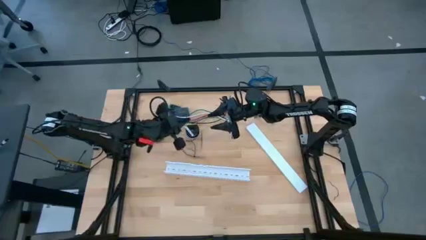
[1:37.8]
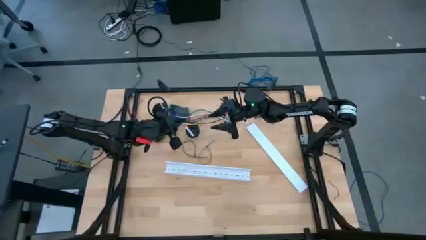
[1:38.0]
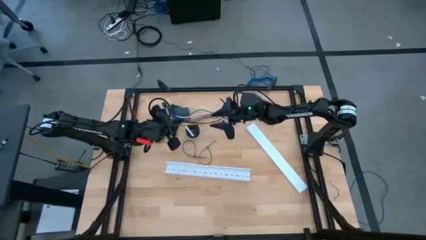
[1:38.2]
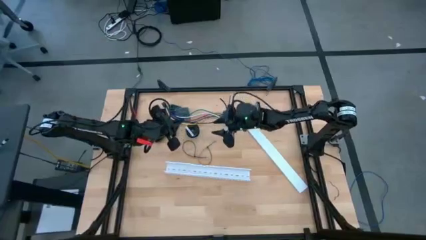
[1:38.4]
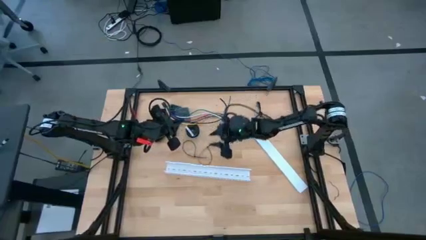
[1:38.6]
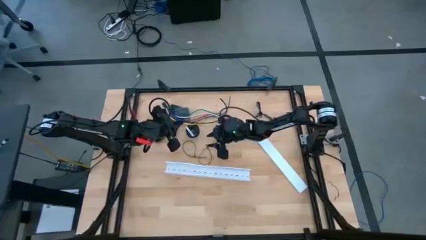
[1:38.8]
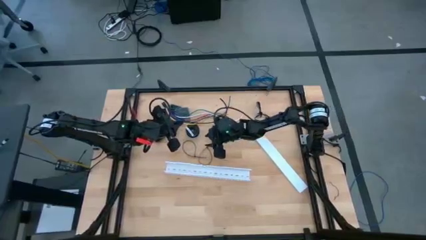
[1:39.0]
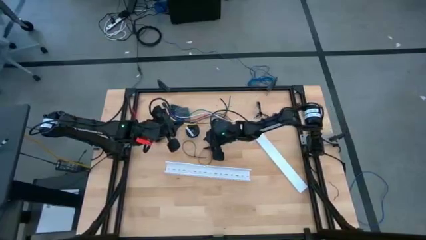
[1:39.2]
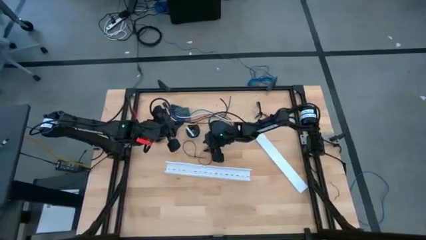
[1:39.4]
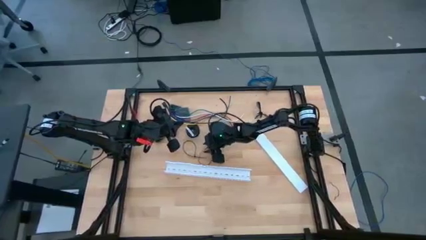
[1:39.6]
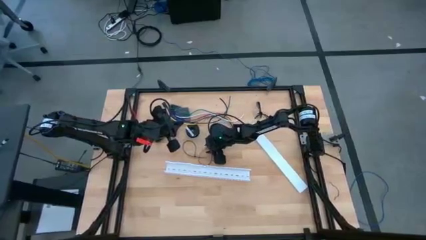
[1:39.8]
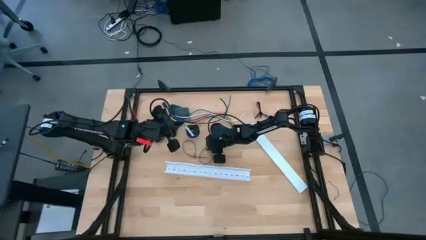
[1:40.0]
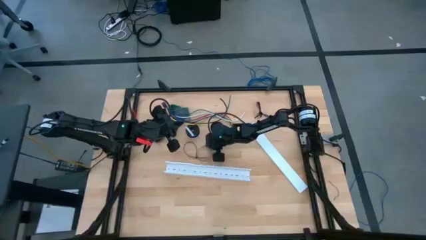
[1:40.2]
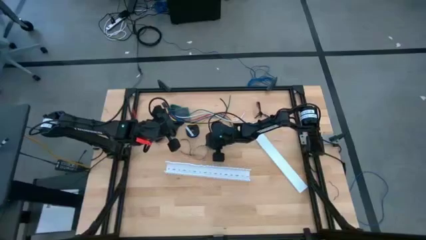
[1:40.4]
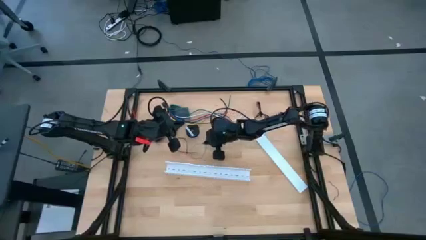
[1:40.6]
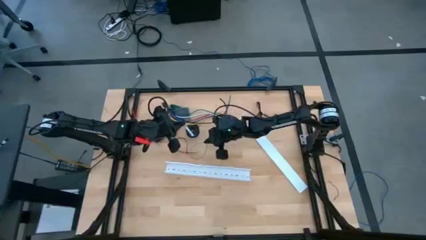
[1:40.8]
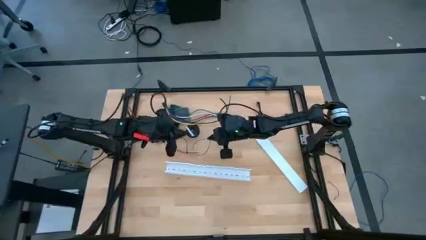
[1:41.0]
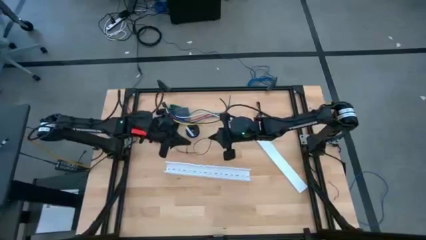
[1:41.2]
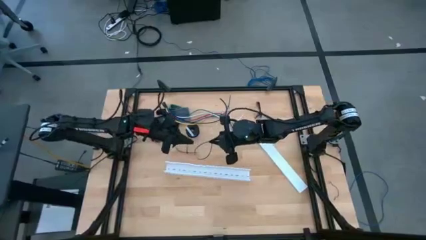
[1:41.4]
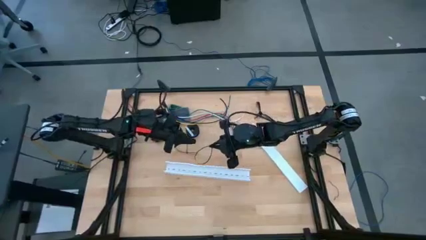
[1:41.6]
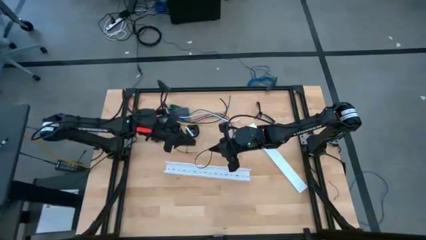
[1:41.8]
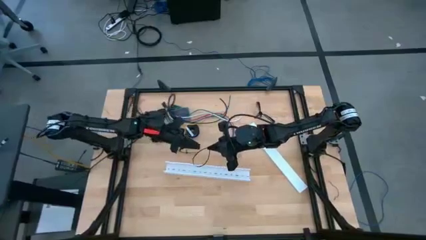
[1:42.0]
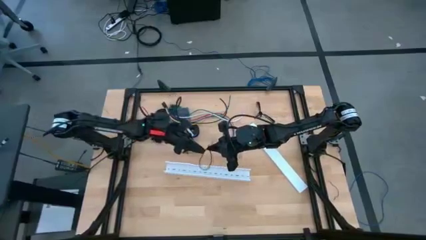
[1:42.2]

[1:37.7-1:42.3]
Task: Ziptie cables
Wrap the cable wires with the black zip tie

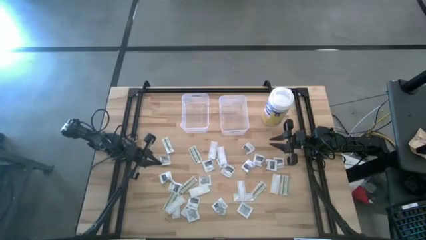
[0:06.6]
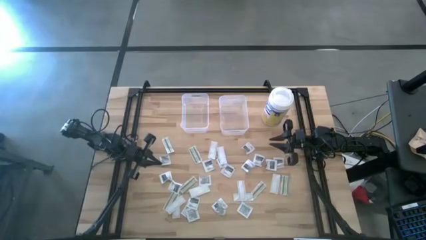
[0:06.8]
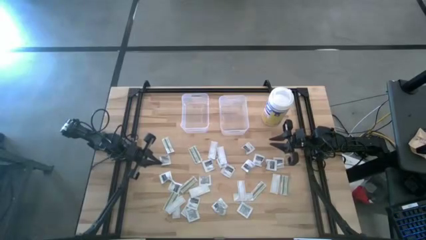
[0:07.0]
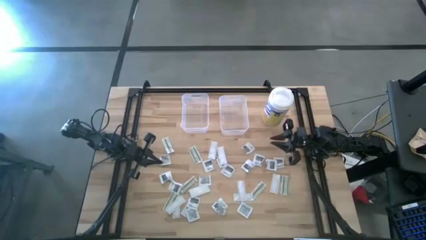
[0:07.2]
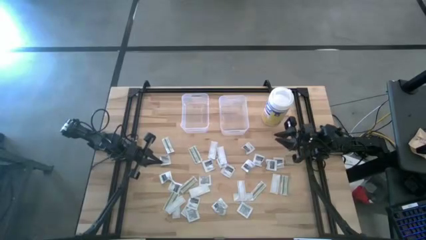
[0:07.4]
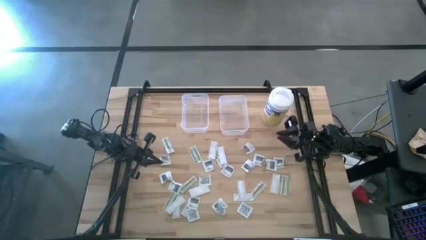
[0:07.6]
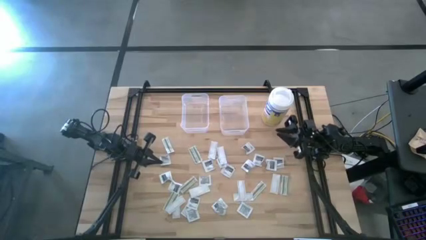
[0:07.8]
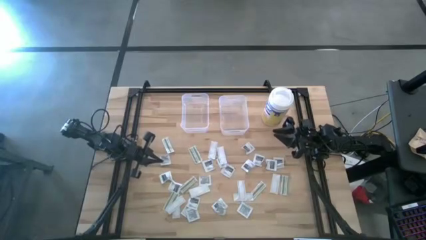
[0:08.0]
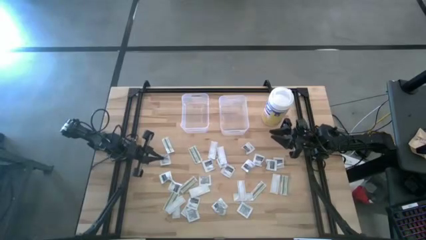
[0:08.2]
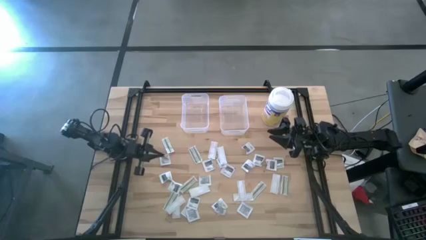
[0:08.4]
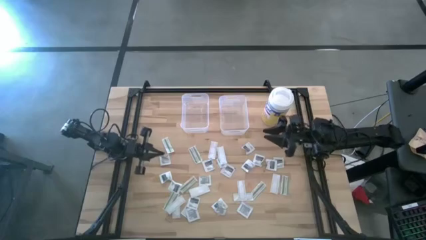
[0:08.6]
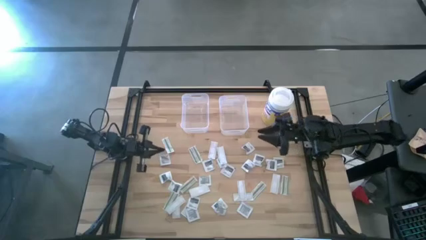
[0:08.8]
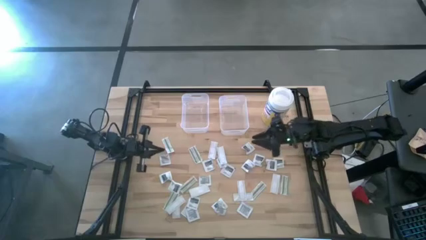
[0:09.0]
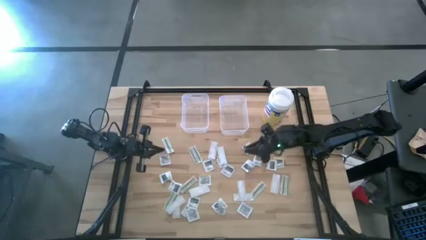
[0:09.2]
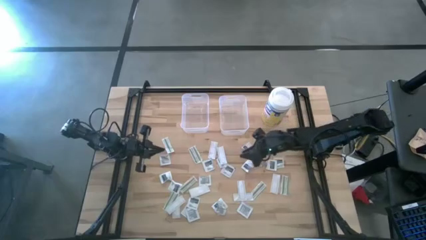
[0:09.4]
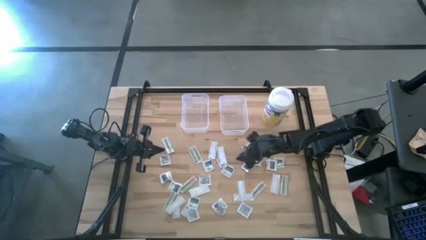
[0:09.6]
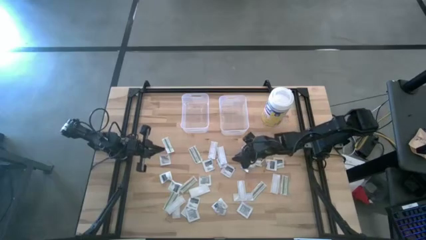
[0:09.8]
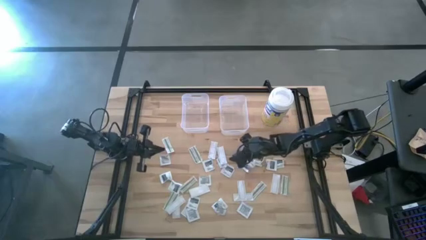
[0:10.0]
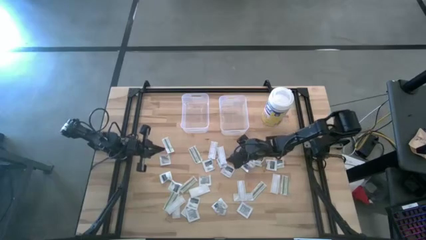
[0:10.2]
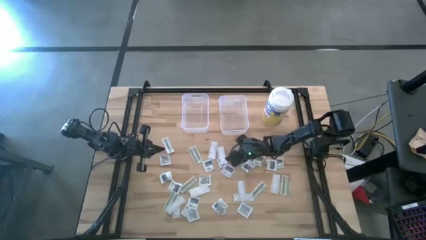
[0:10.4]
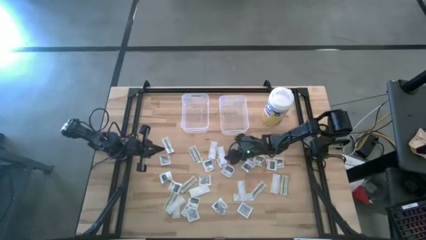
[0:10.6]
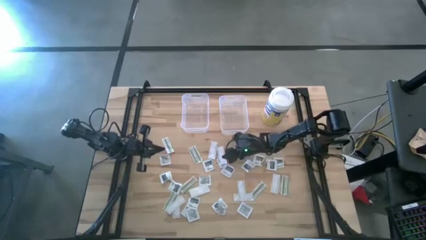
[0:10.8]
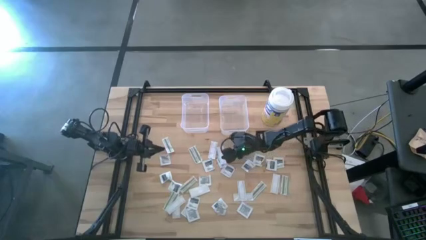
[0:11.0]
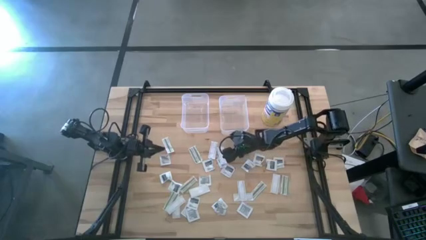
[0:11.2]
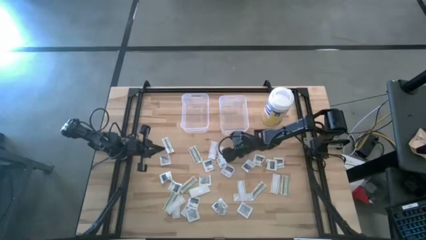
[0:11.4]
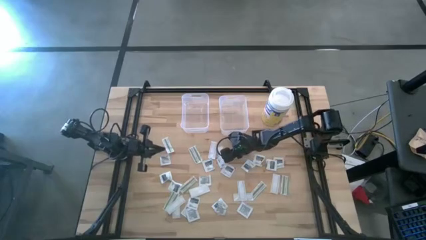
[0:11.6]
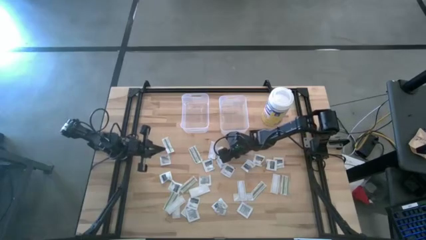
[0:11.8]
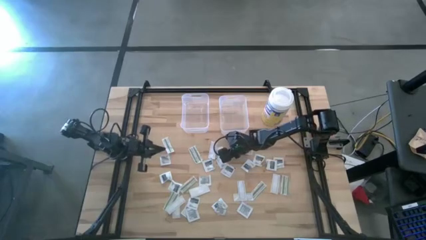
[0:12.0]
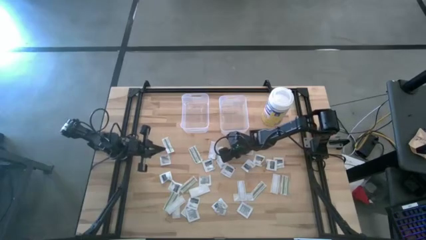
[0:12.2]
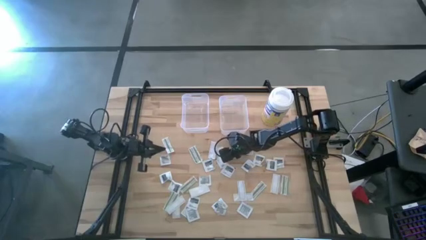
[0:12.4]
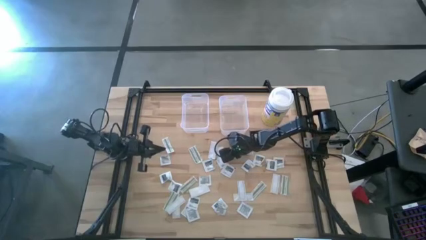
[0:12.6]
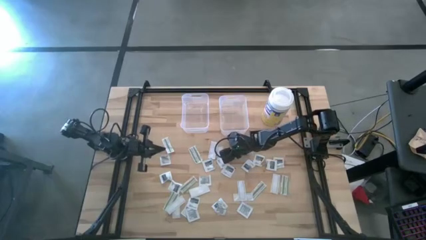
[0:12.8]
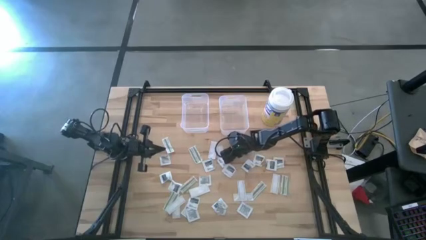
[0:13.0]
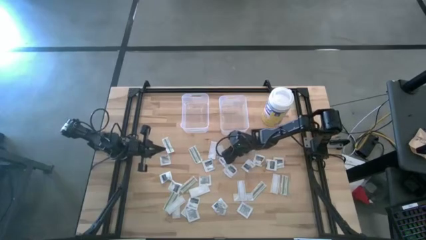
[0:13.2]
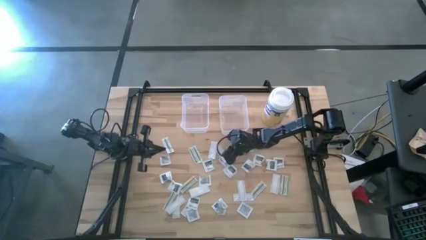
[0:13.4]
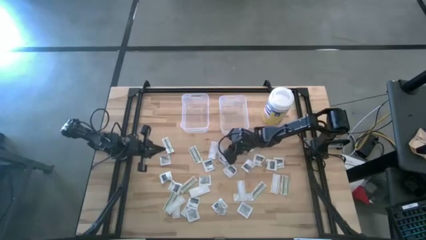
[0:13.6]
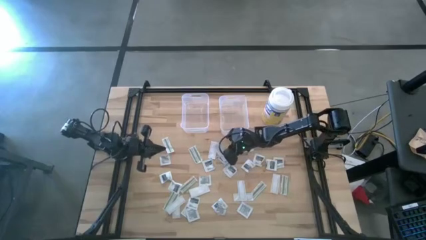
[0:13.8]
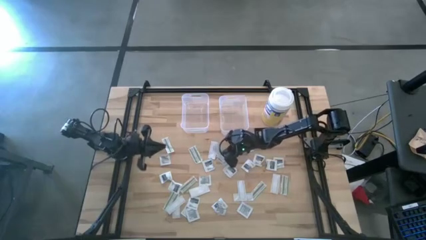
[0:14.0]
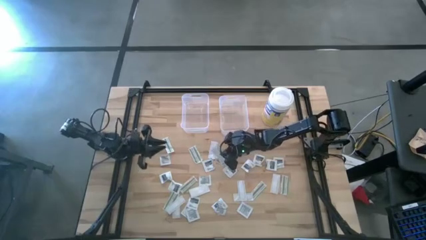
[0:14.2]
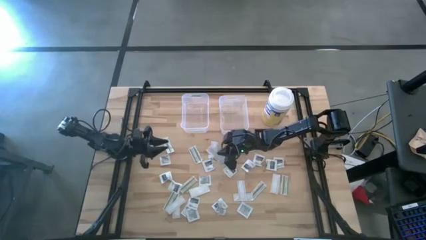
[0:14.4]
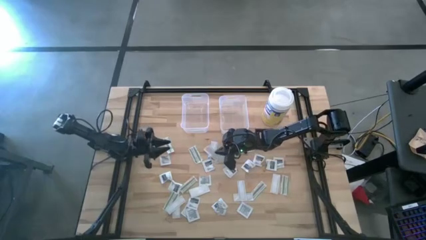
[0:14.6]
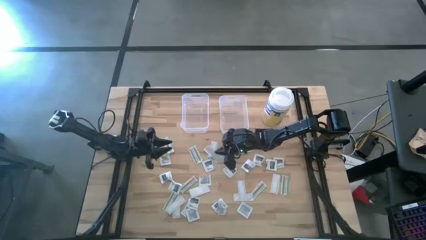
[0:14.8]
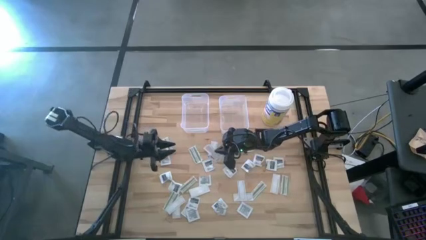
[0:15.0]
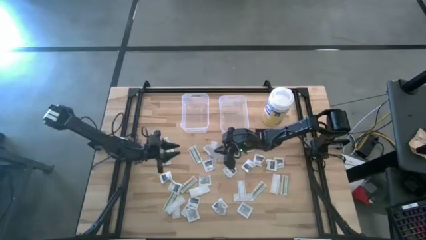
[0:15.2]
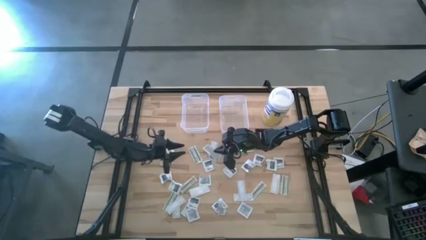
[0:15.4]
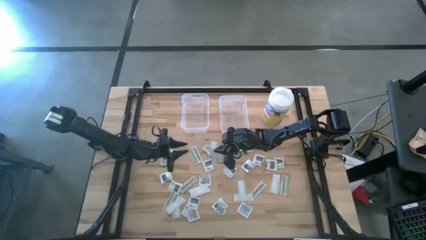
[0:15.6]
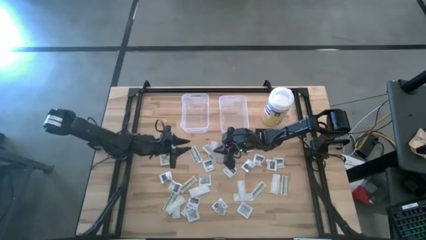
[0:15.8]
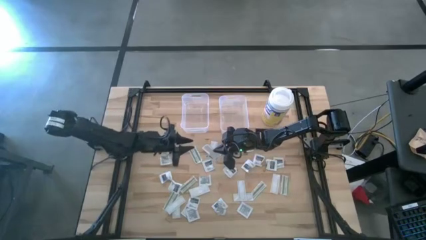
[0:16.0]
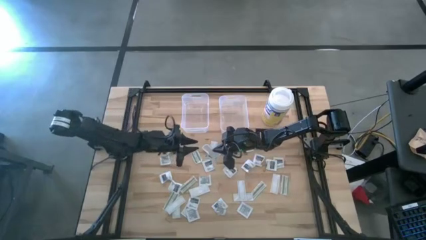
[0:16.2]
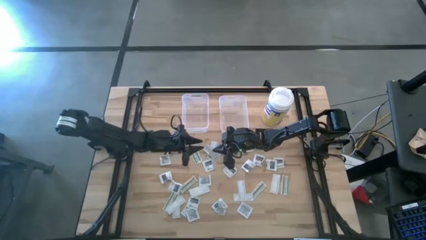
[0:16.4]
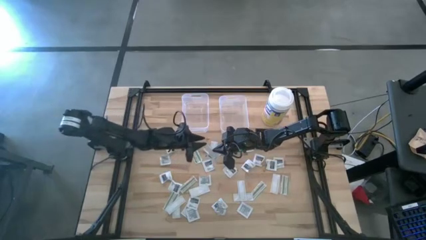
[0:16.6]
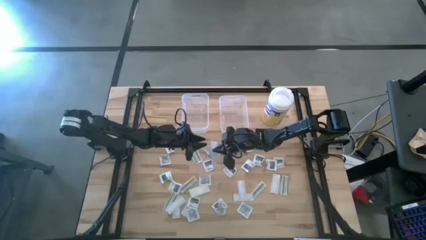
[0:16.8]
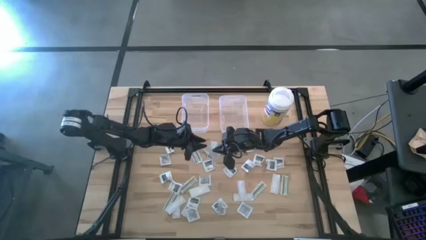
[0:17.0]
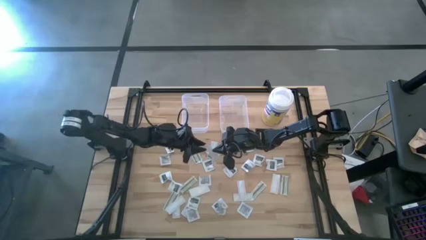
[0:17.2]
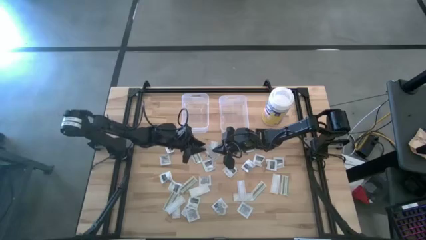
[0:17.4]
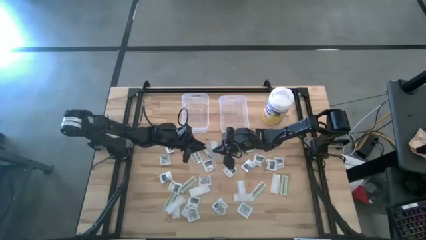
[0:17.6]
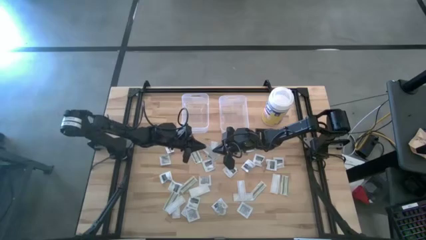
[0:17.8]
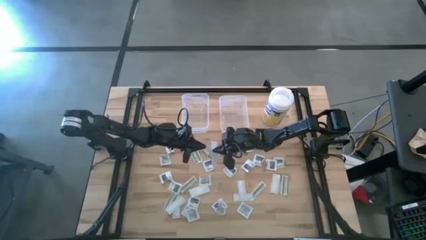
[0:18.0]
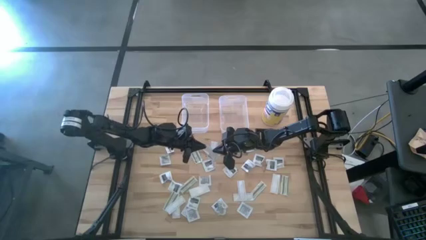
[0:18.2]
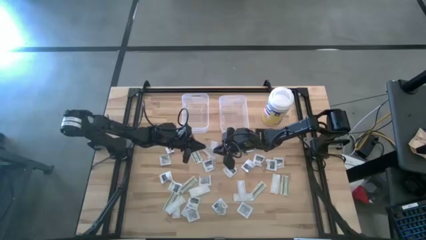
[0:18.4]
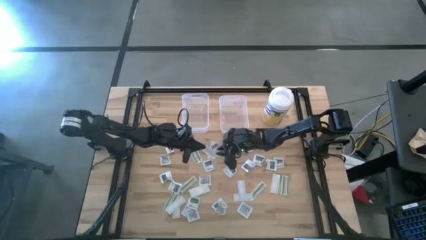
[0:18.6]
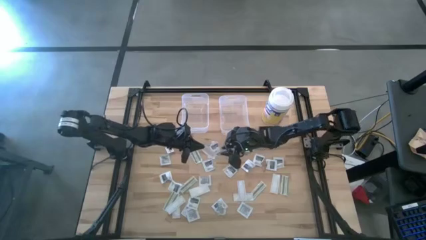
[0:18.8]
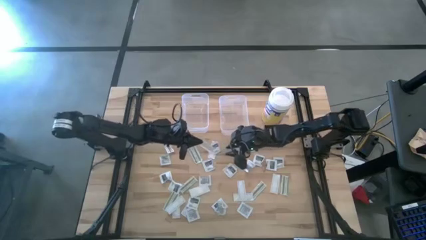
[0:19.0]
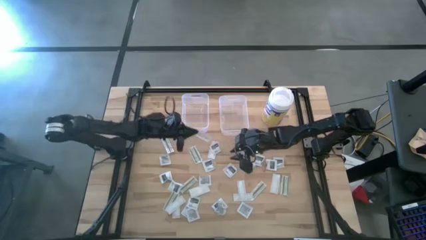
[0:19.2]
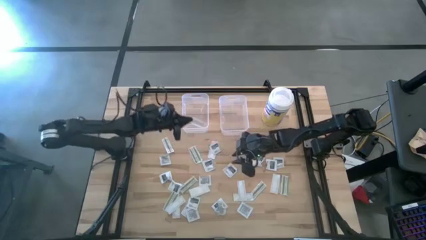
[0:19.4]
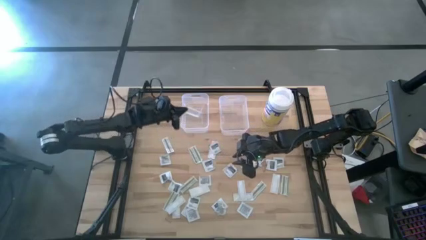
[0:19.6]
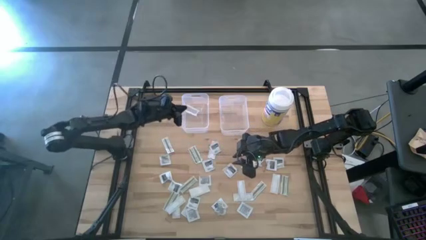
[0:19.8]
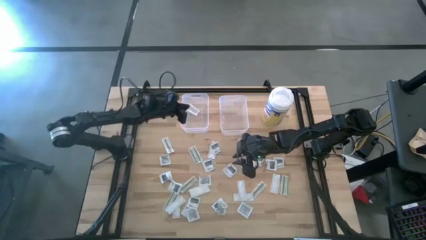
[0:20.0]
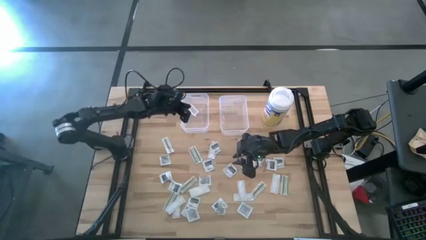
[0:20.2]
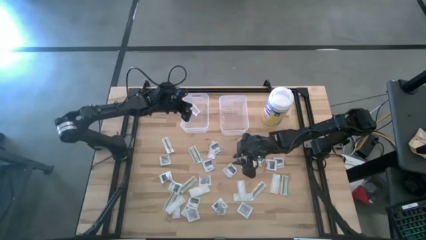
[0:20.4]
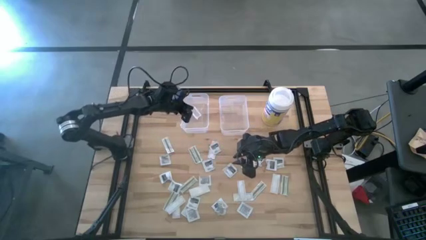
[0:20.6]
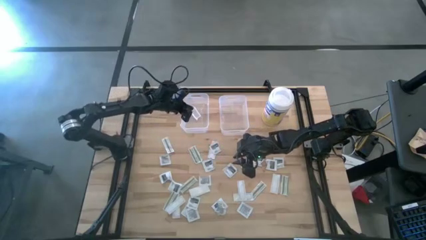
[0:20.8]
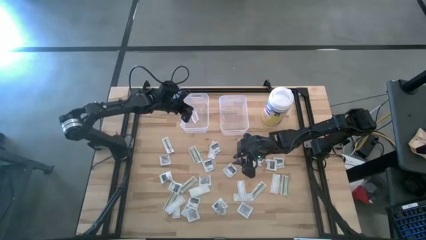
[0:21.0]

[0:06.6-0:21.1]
Task: Pick & Place First Aid Supplies
Put the green bandage pack into the left transparent bin
